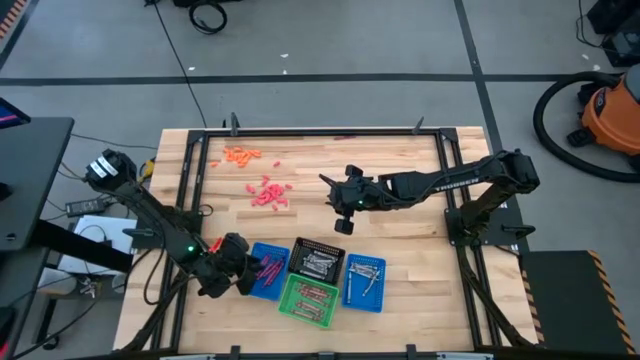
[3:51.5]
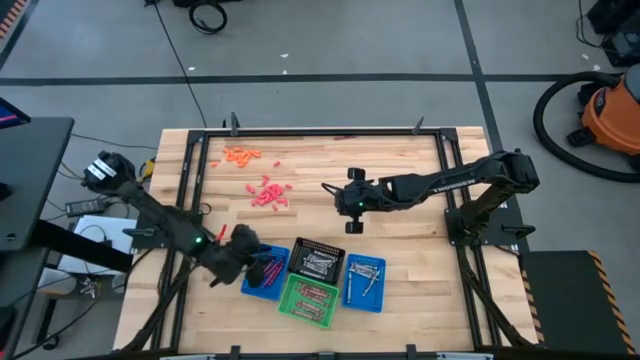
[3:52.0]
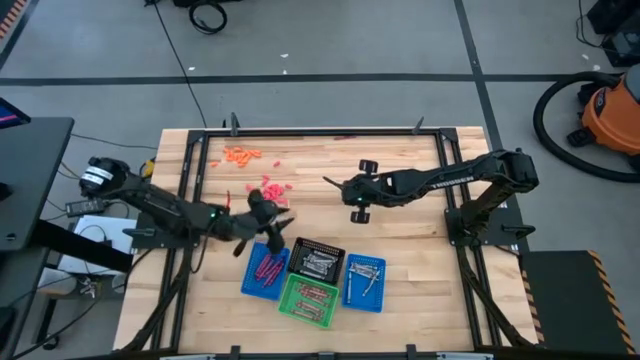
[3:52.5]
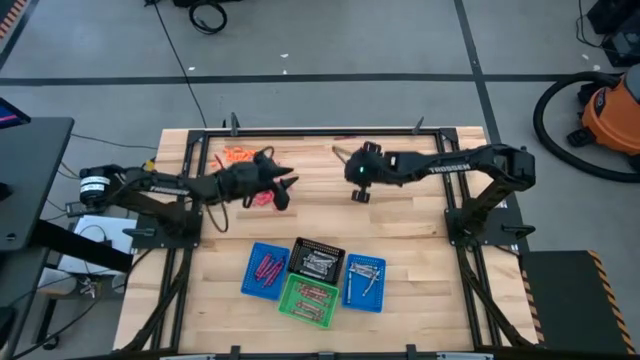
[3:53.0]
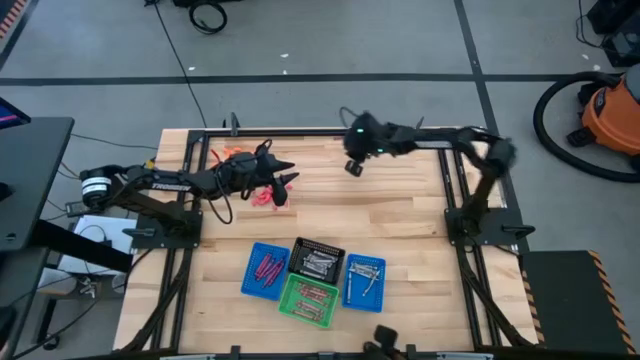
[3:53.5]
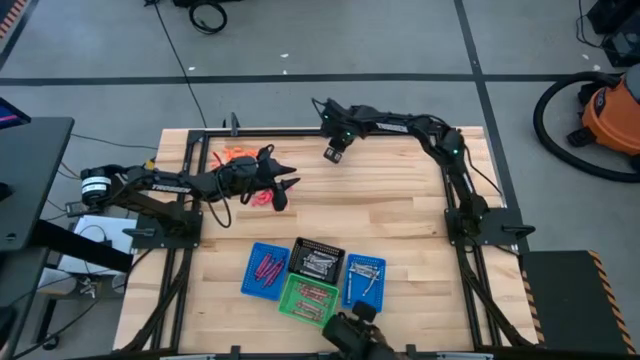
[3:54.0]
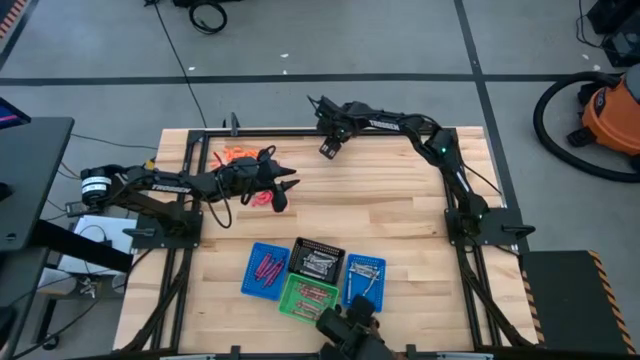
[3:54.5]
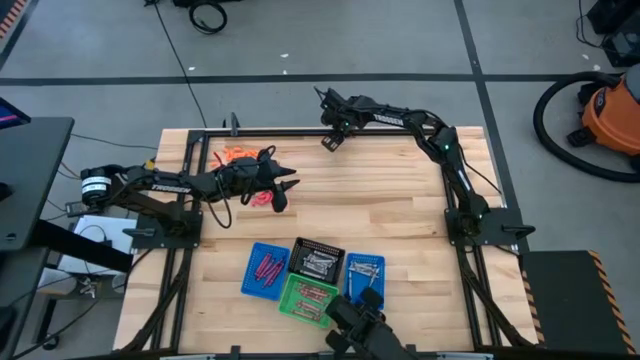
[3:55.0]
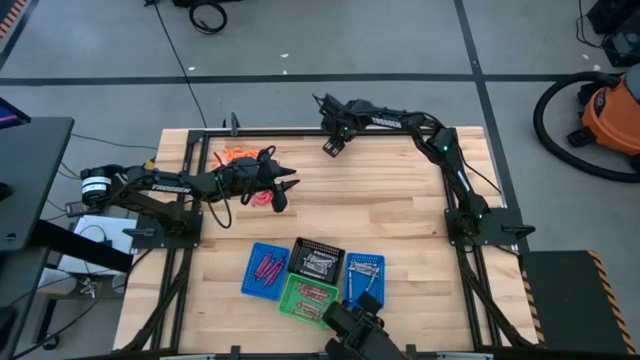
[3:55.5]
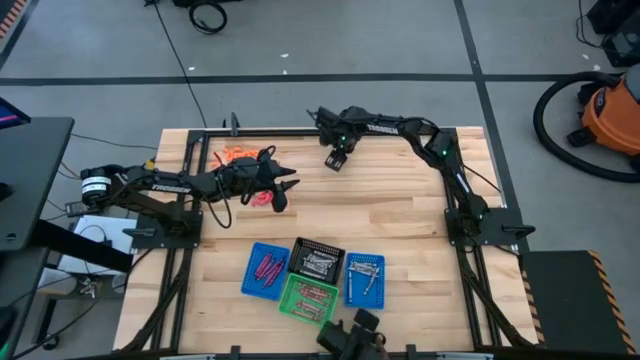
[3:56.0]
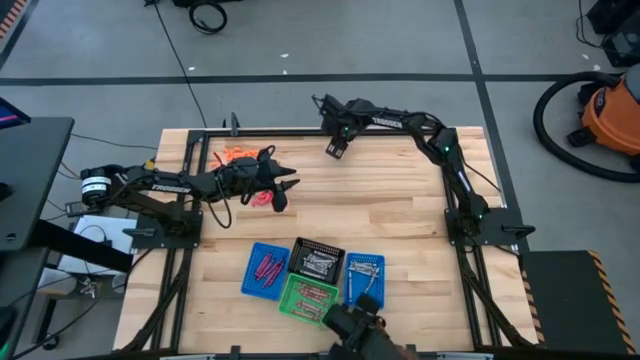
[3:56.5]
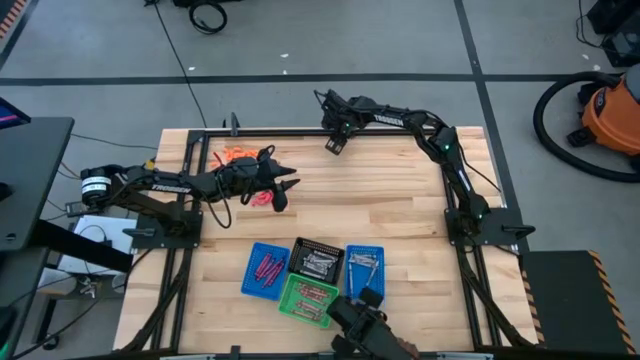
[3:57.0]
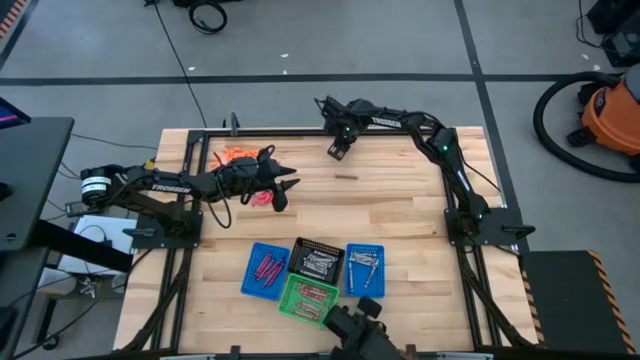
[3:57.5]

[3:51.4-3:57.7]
Task: Sort crayons
Put the dark red crayon into the left blue bin

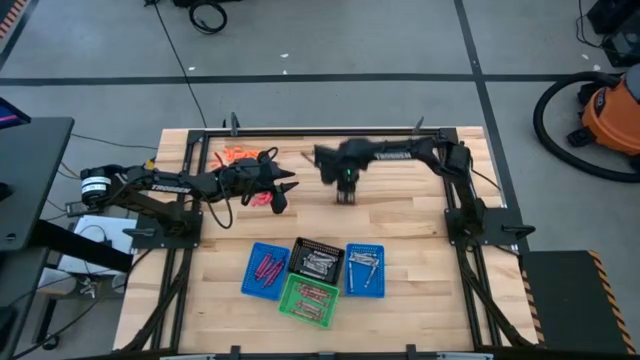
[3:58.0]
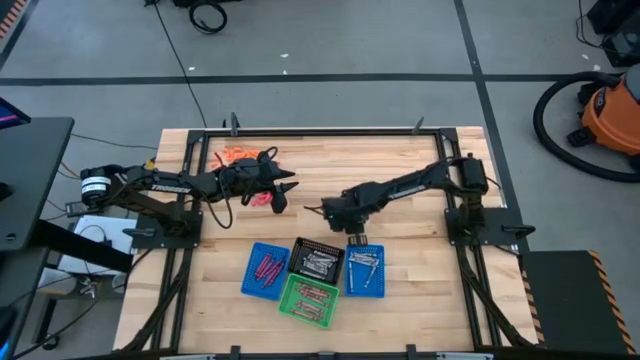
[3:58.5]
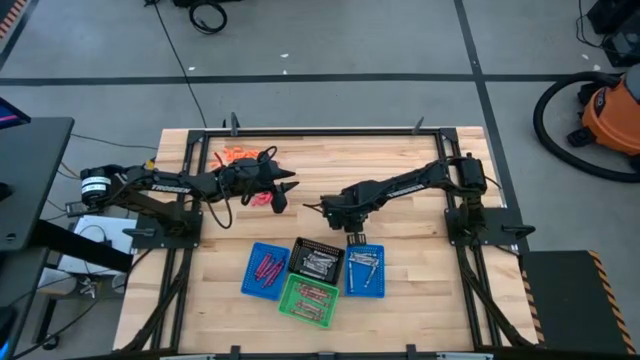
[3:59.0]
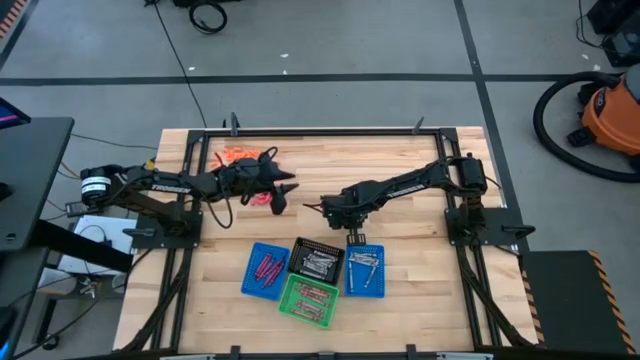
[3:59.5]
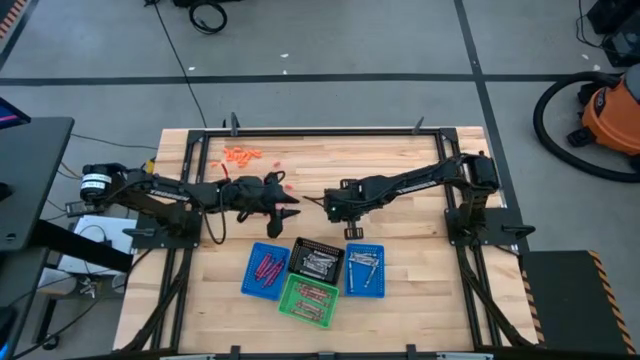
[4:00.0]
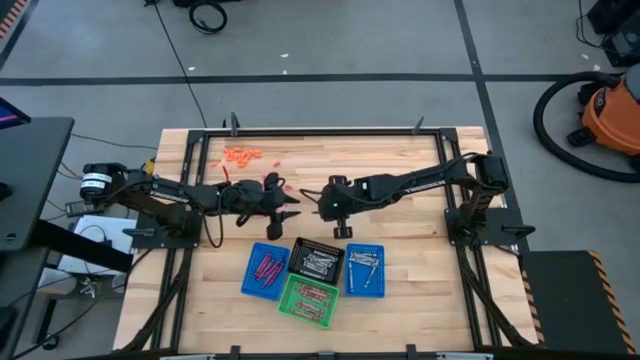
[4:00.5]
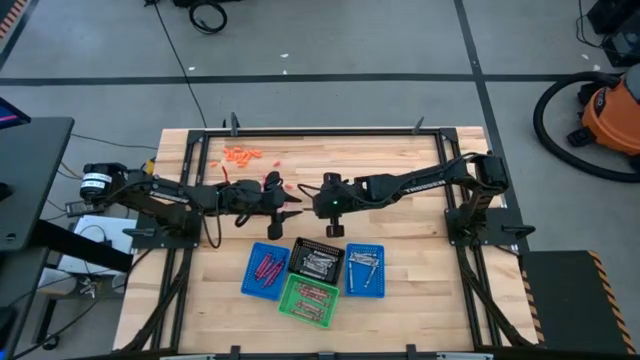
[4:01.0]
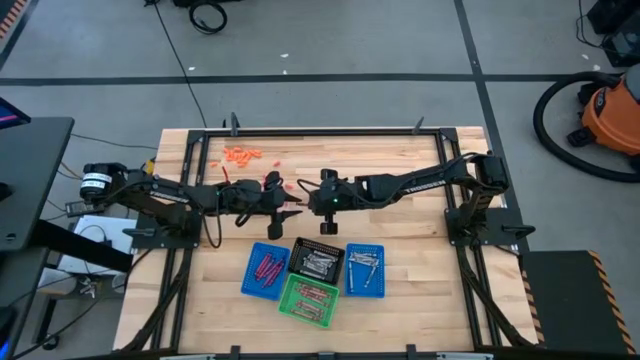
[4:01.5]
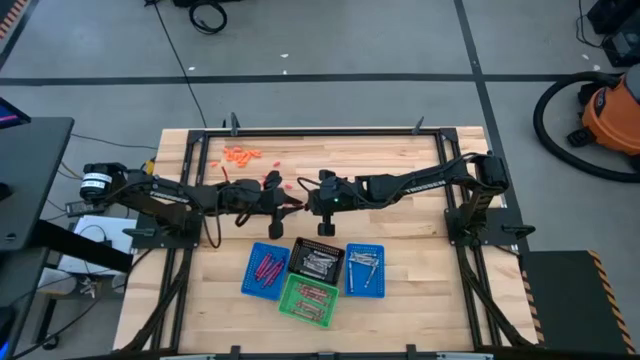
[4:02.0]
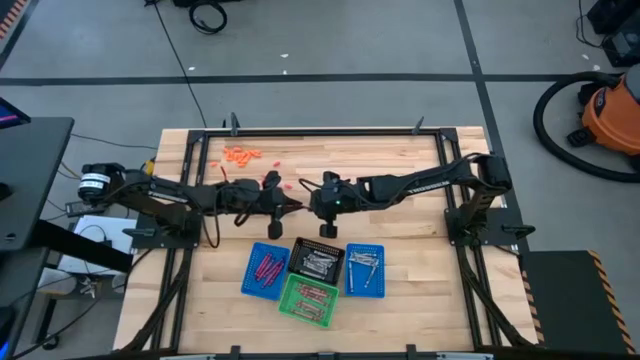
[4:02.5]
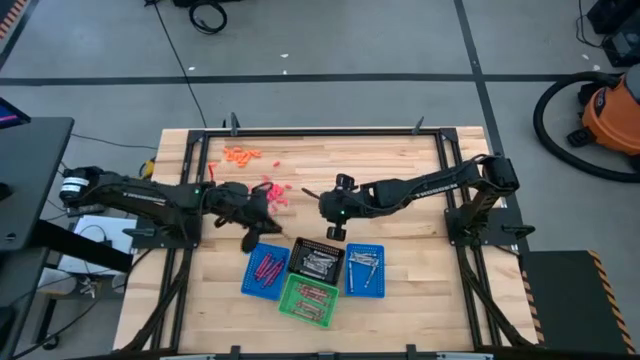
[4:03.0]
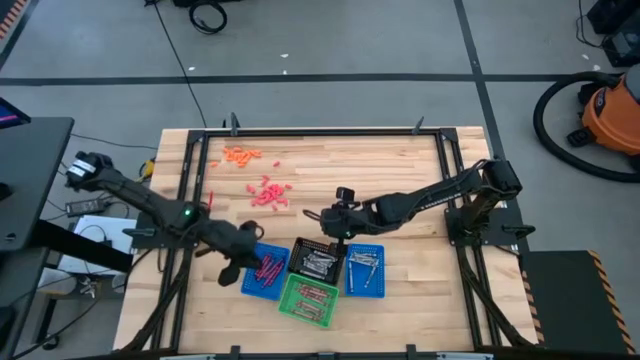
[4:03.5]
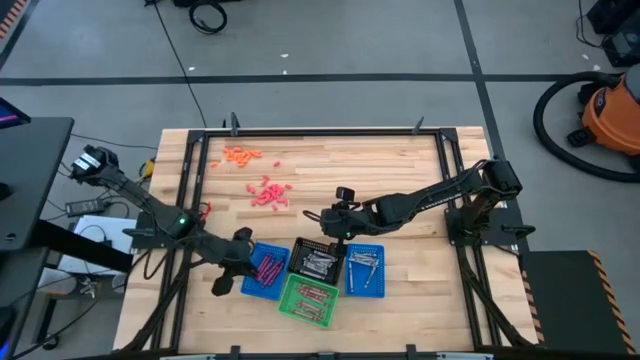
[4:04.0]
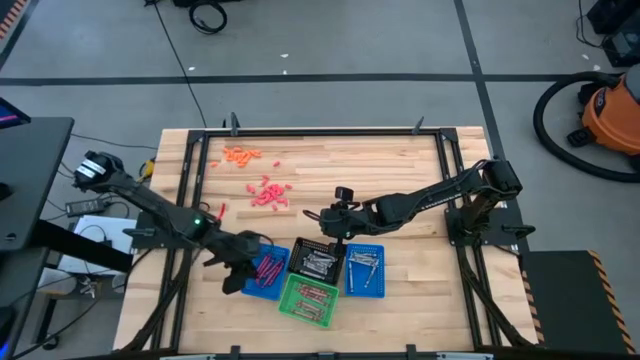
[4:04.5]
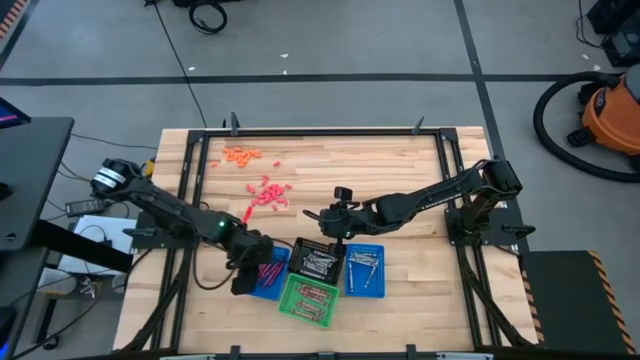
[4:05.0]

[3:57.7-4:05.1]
Put the dark red crayon into the left blue bin

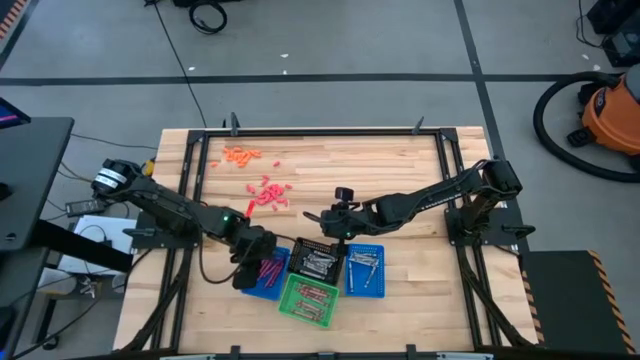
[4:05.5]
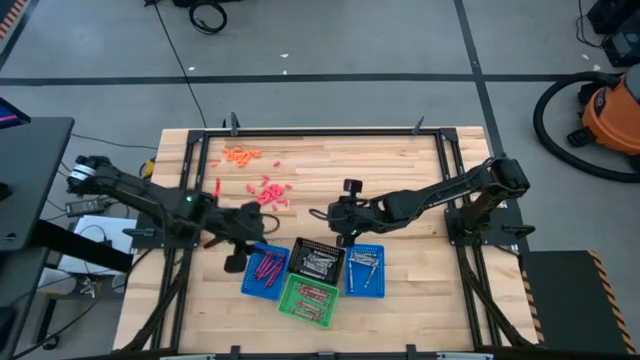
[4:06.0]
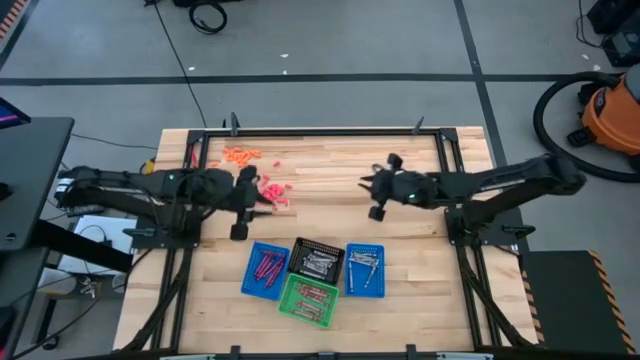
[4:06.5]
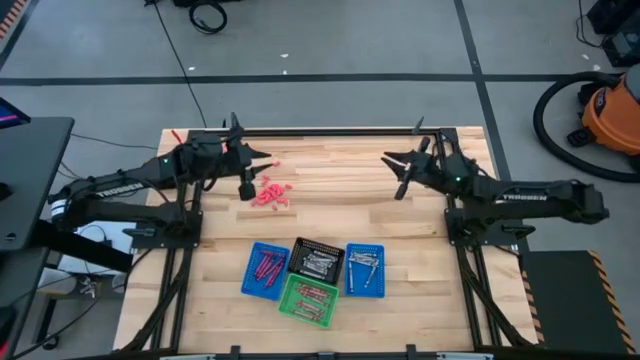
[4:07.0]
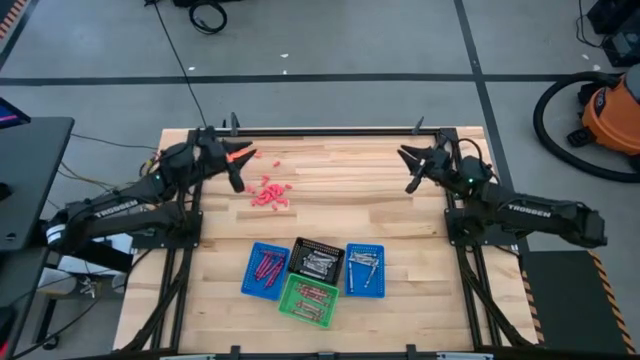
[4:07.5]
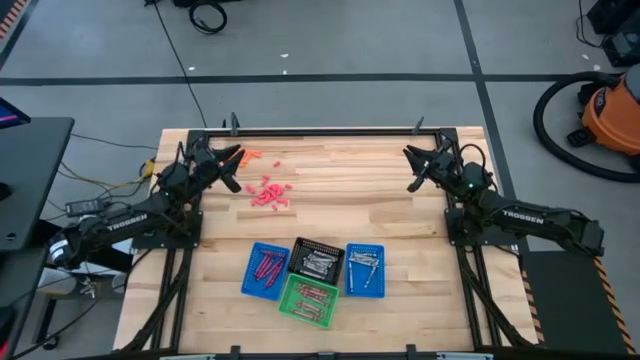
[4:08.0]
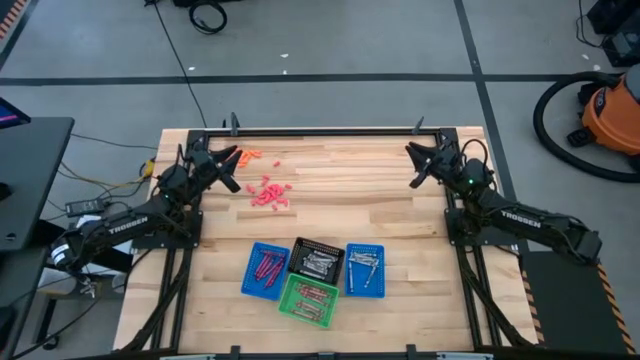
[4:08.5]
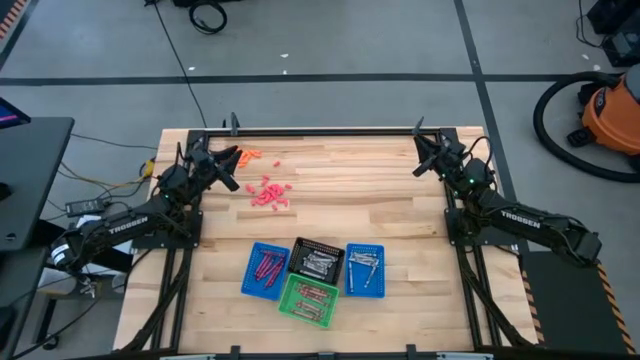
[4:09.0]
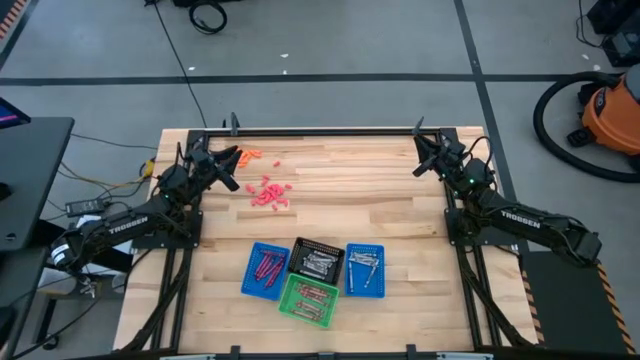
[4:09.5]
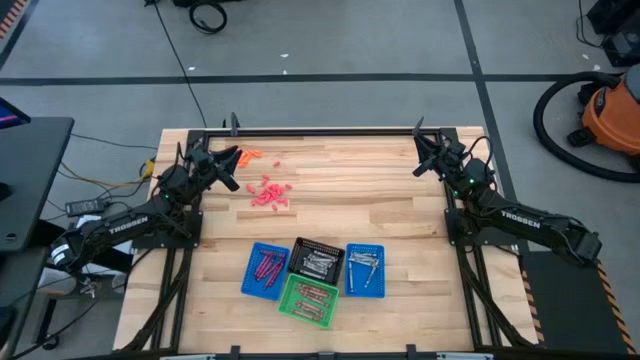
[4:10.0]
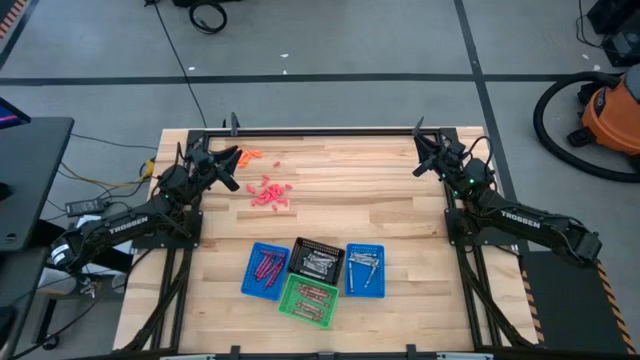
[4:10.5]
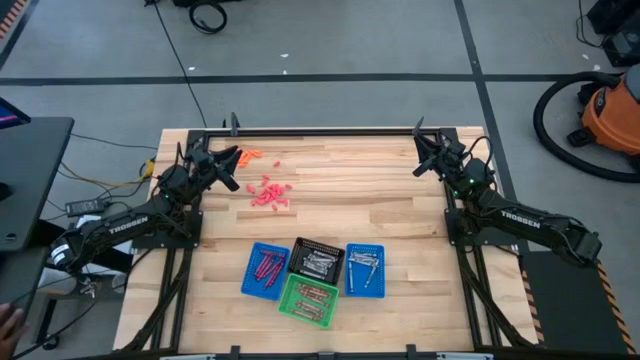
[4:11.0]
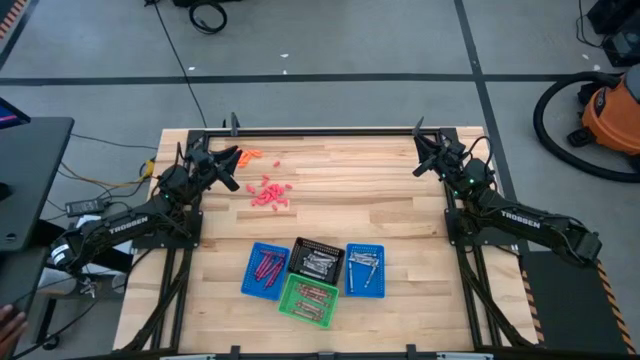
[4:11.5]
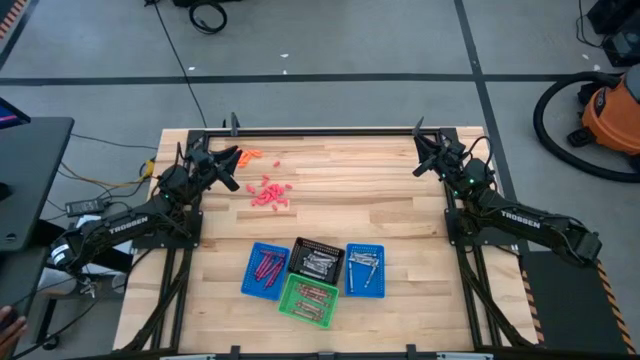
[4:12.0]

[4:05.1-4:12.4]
Return to Home Position
